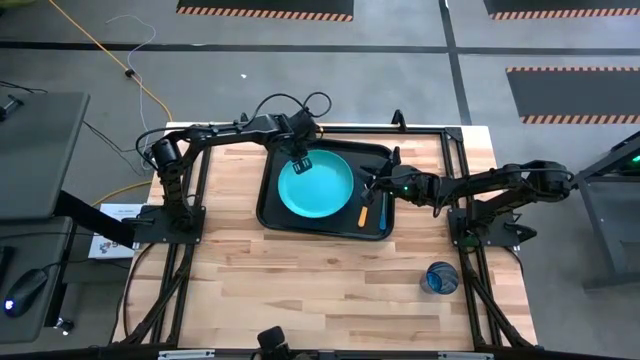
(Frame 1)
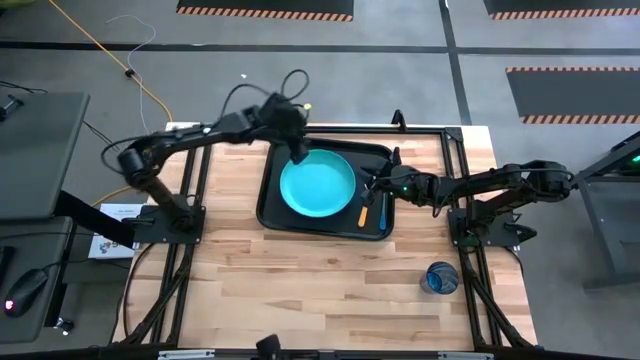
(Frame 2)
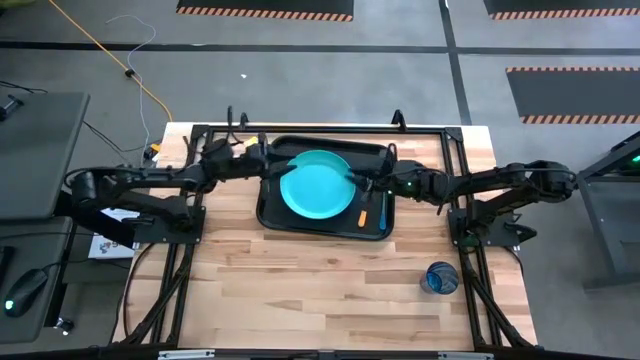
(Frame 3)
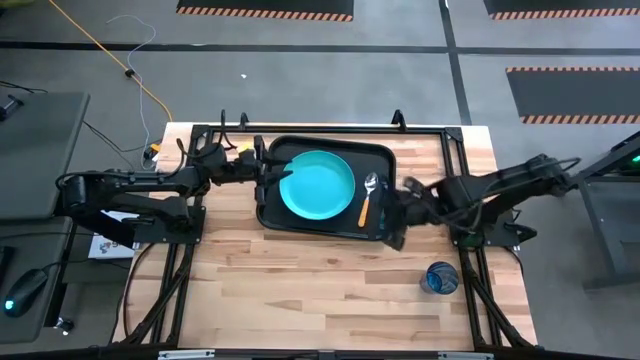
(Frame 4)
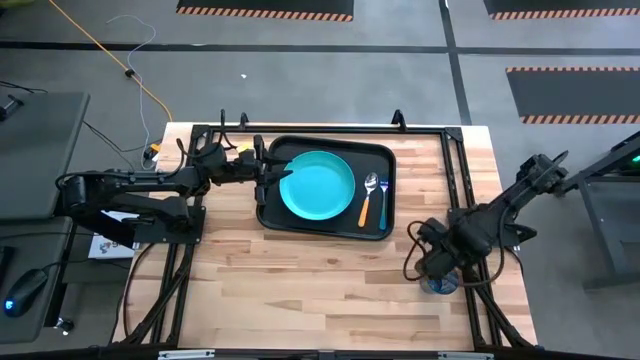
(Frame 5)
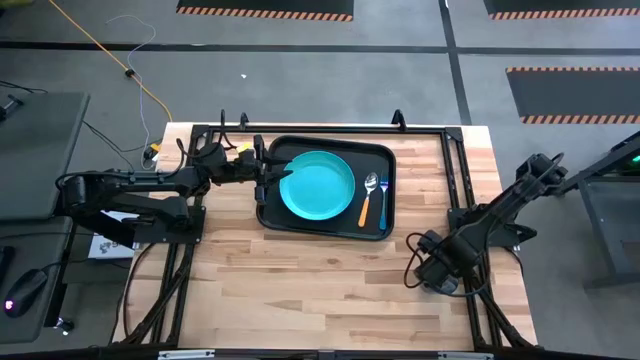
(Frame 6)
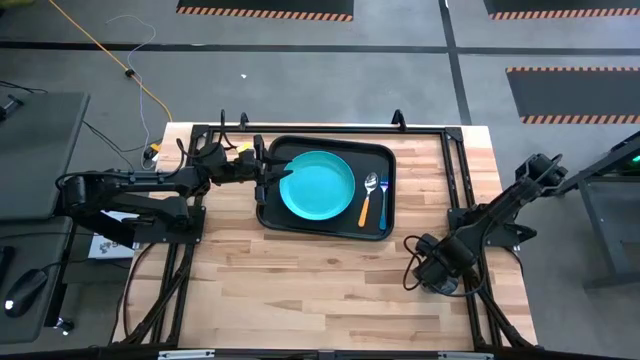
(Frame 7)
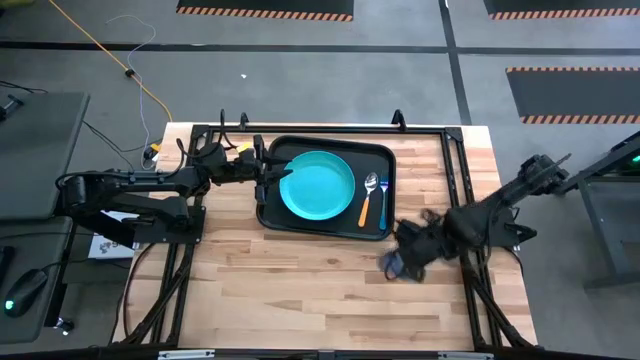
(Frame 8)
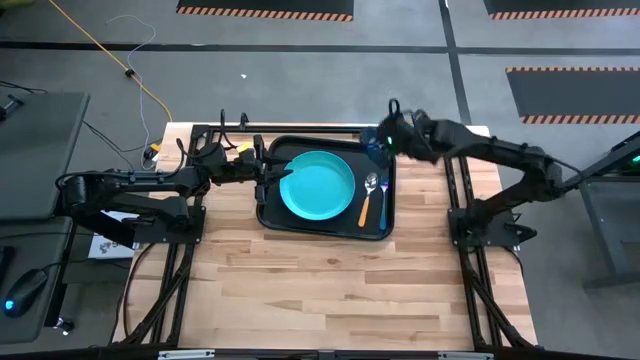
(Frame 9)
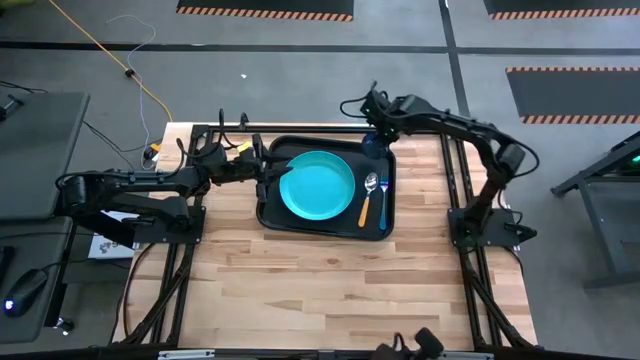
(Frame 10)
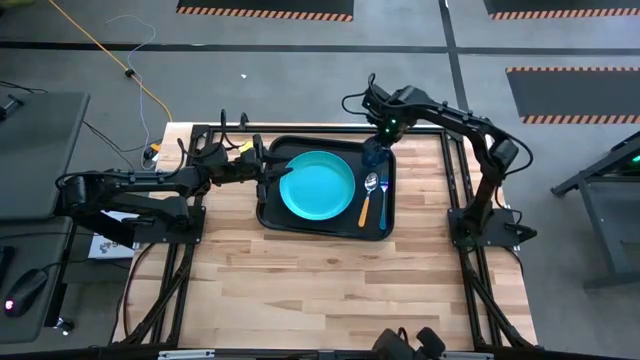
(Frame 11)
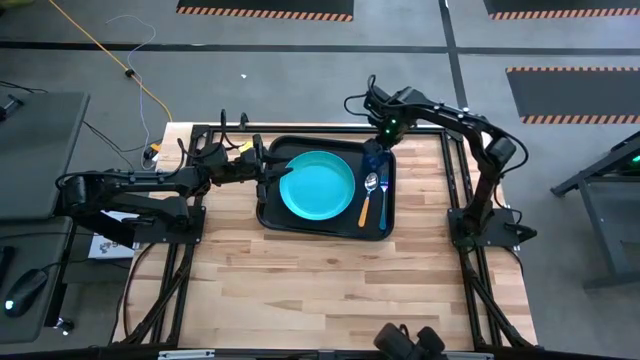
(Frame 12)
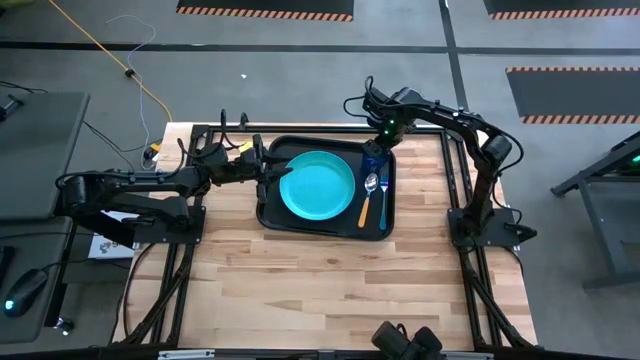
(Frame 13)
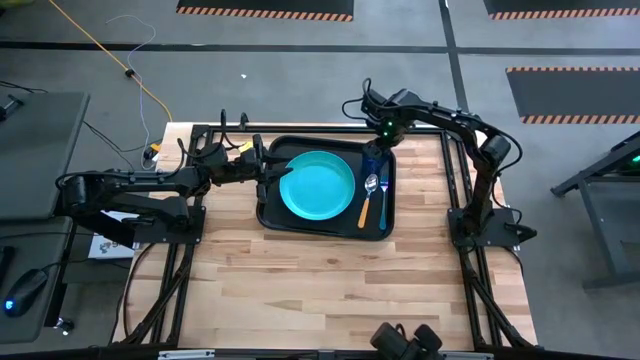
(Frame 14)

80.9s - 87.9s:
Task: Pick and place plate/cup/fork/spoon on tray
Put the blue cup on the black tray to the top of the yellow spoon

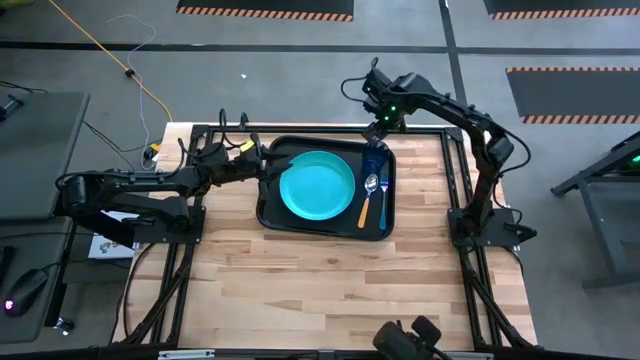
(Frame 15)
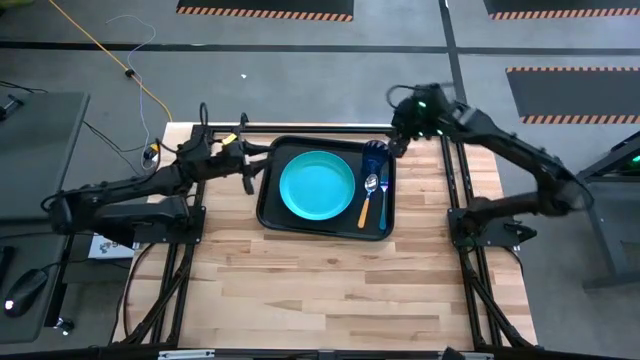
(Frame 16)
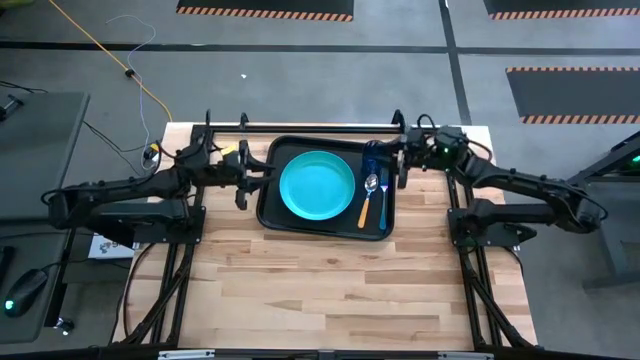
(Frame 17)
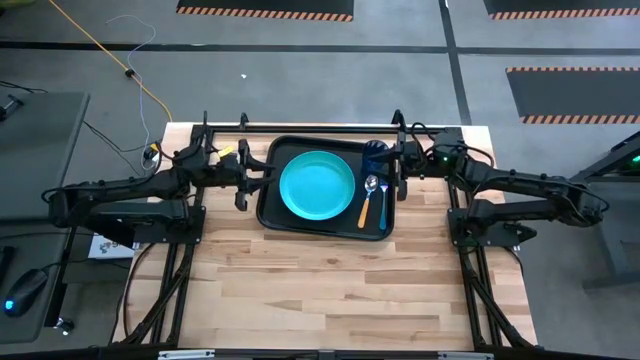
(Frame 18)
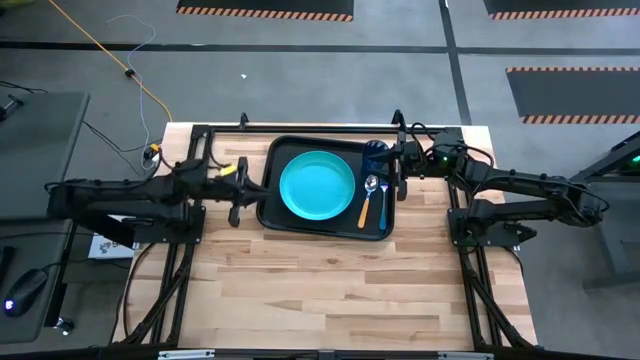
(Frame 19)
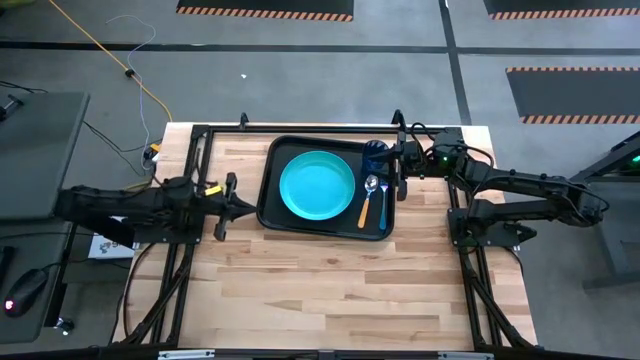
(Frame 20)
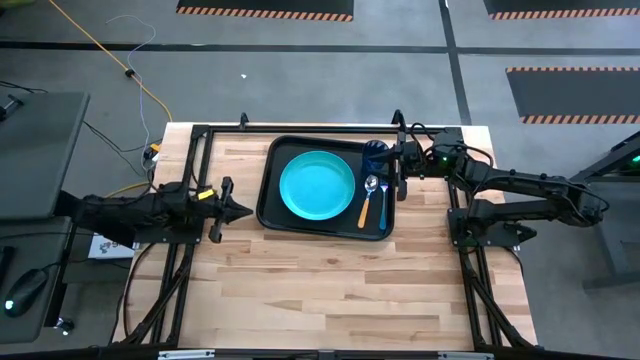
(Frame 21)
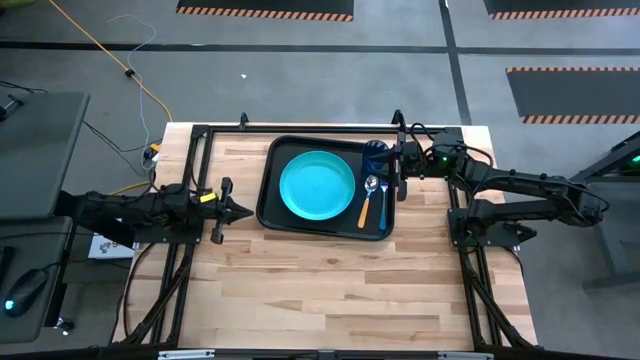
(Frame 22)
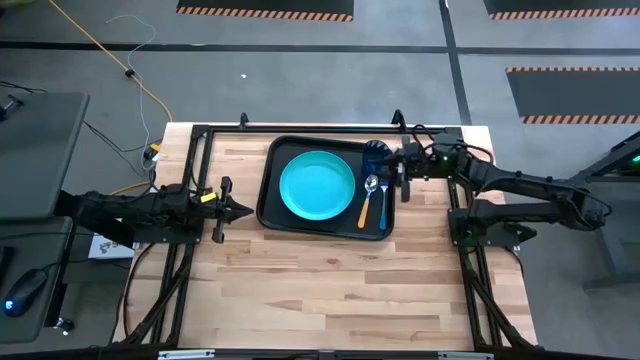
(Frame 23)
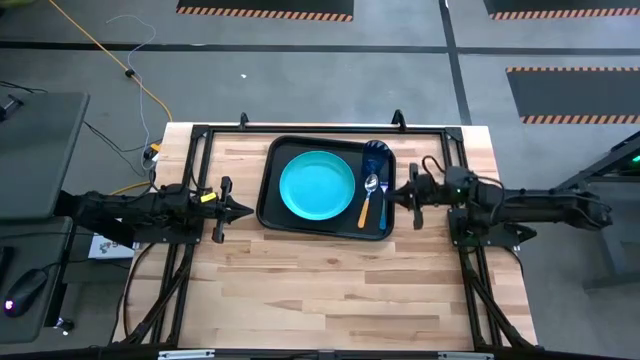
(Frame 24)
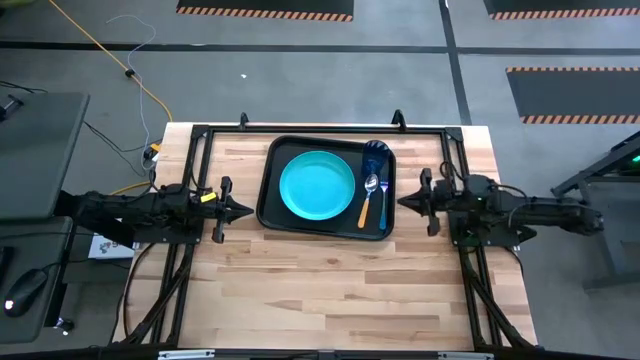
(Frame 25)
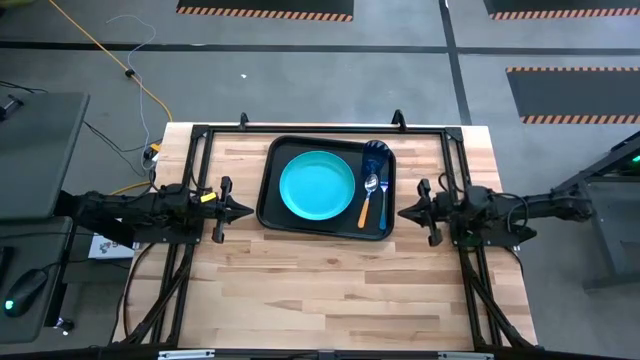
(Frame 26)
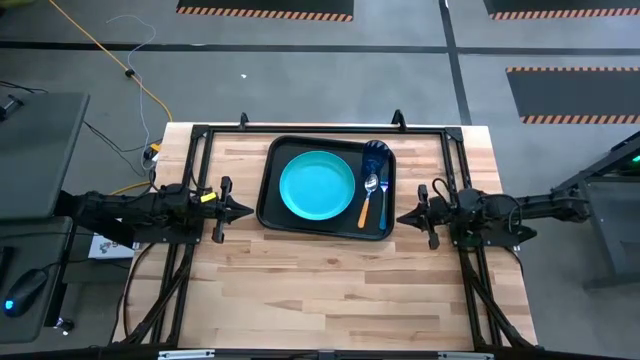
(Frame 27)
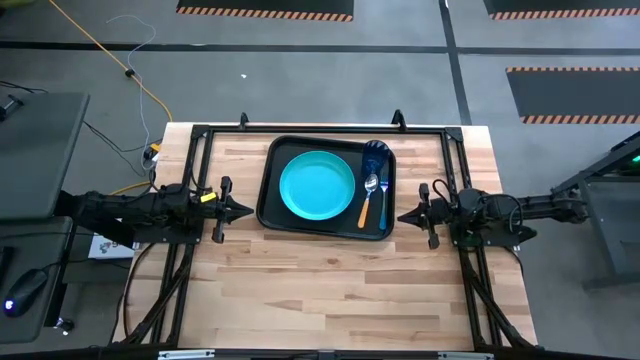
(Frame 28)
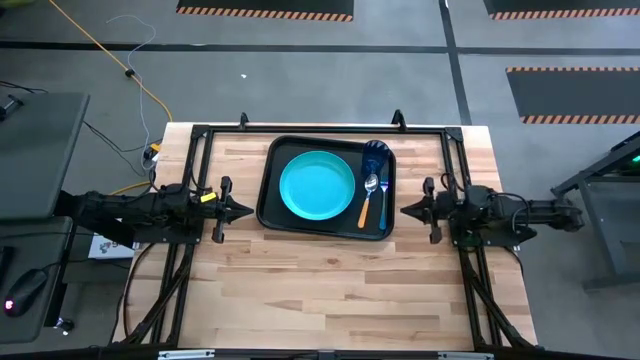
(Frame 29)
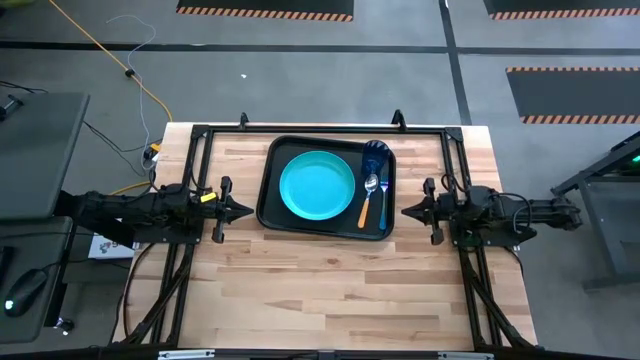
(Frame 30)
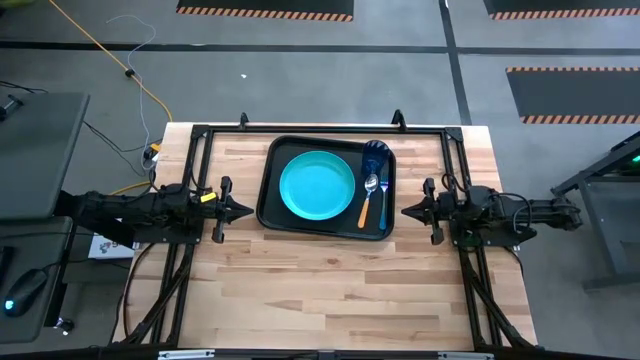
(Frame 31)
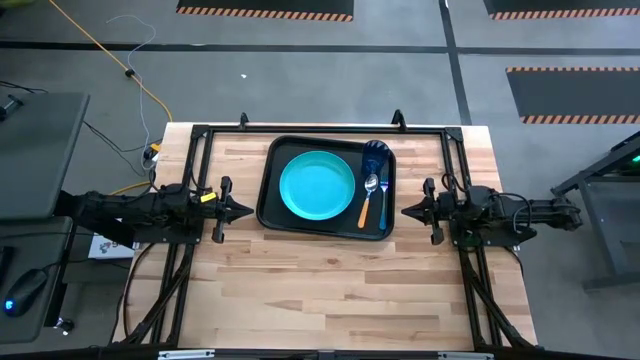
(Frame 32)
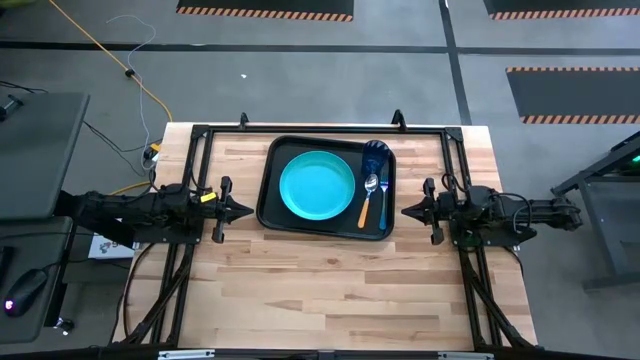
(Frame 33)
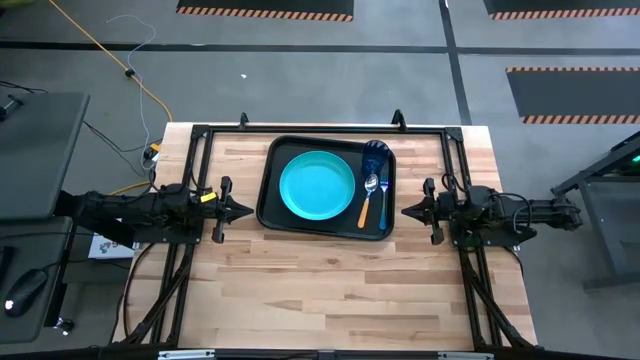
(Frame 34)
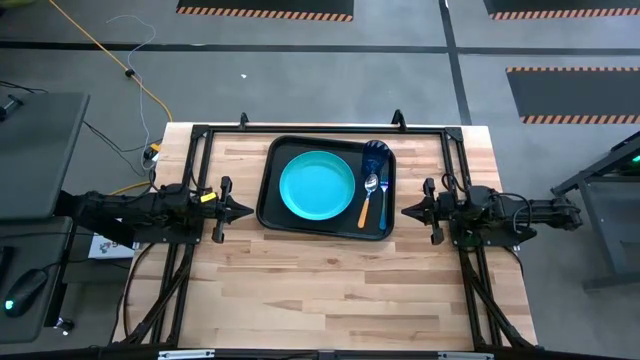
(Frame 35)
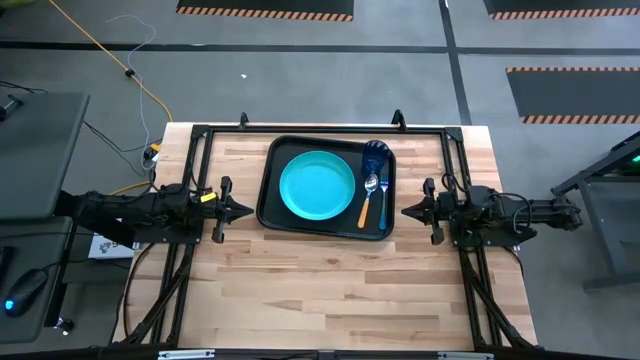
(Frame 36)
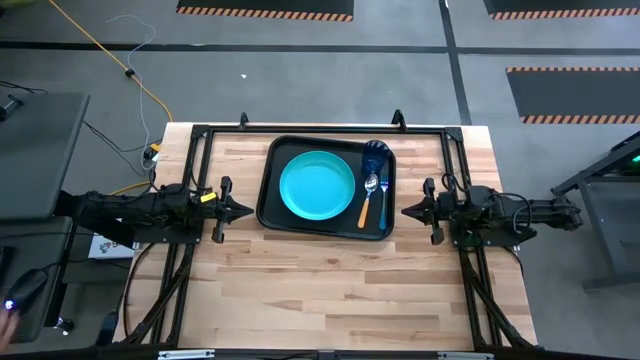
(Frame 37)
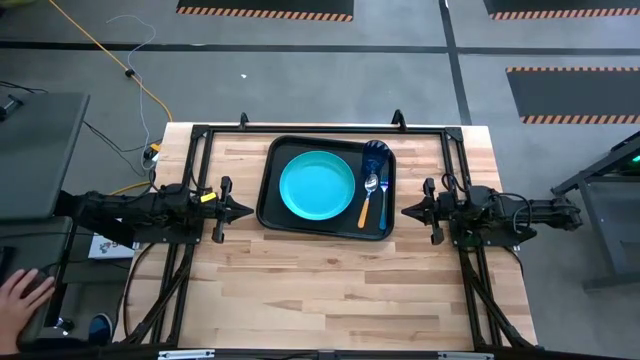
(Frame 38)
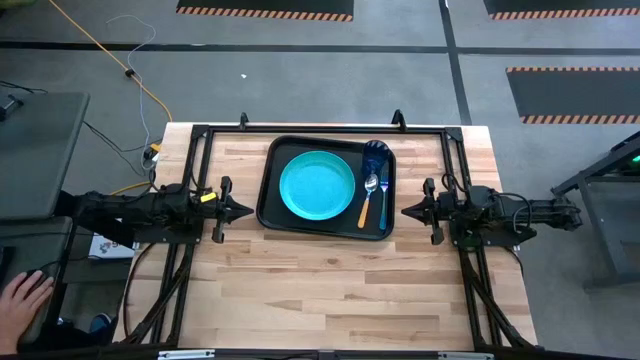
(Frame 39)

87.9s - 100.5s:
Return to Home Position
